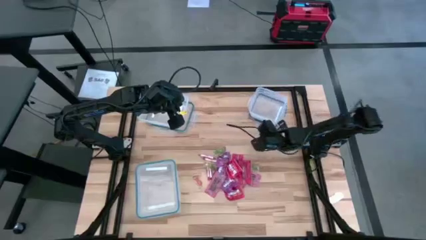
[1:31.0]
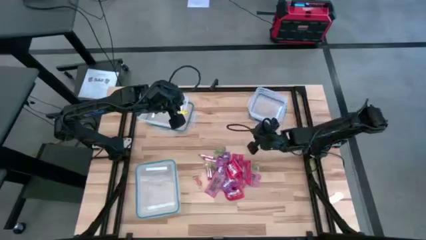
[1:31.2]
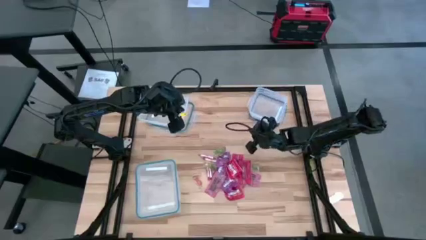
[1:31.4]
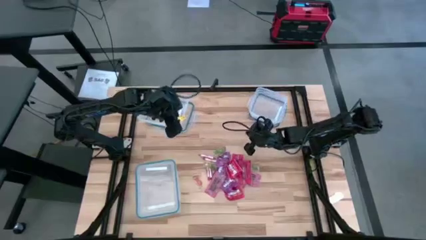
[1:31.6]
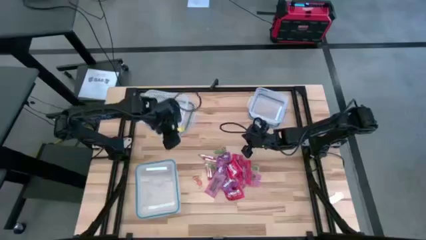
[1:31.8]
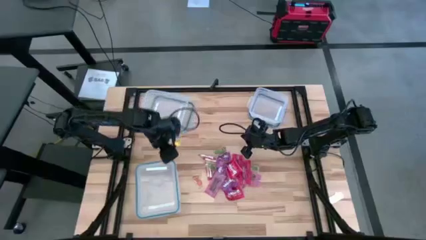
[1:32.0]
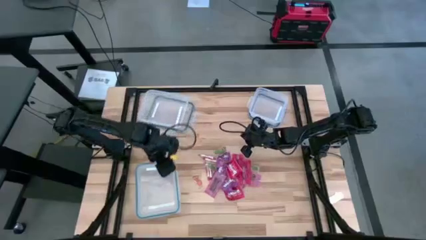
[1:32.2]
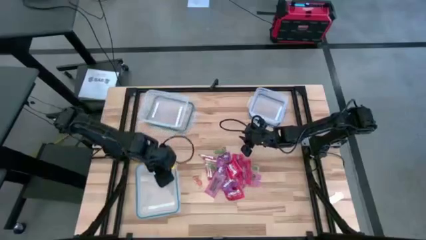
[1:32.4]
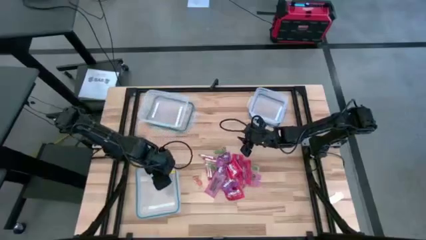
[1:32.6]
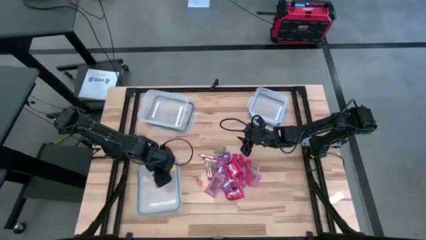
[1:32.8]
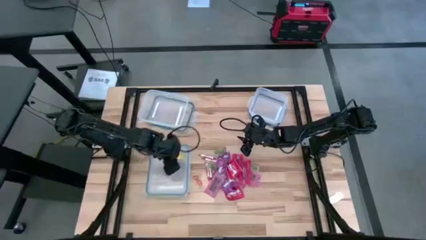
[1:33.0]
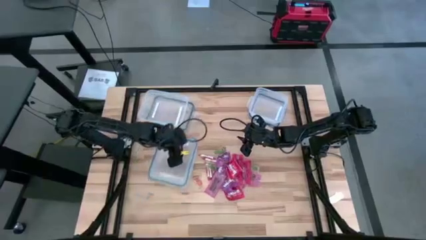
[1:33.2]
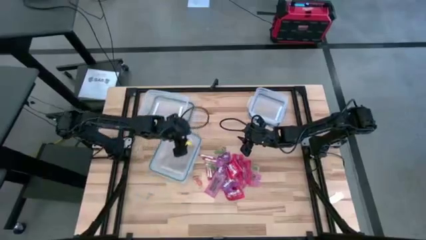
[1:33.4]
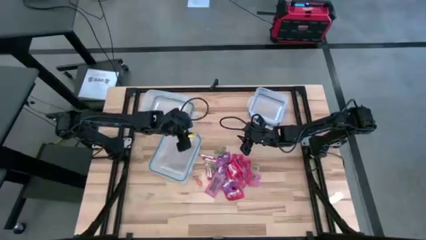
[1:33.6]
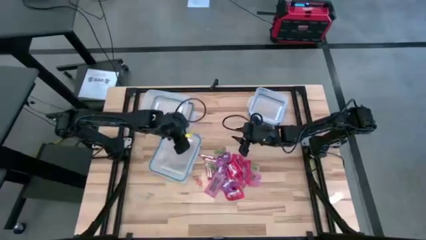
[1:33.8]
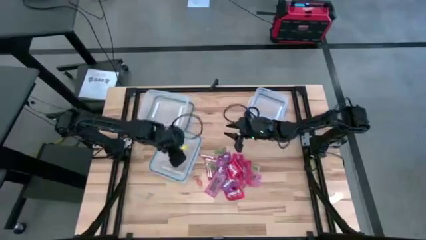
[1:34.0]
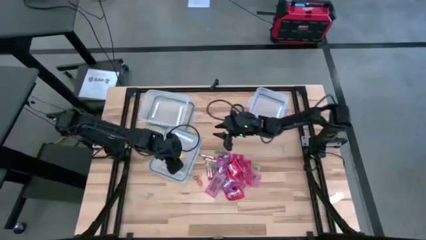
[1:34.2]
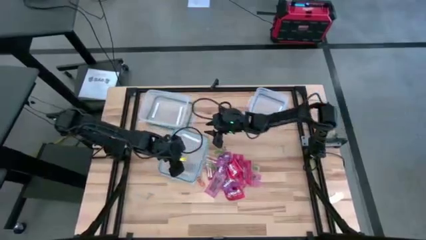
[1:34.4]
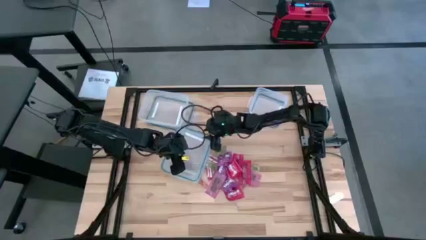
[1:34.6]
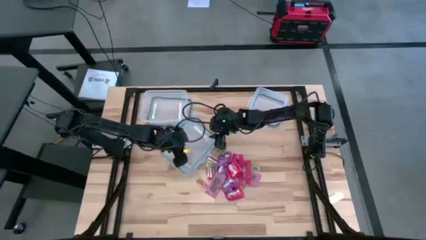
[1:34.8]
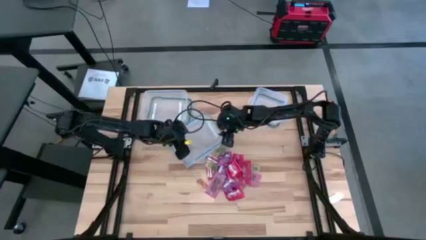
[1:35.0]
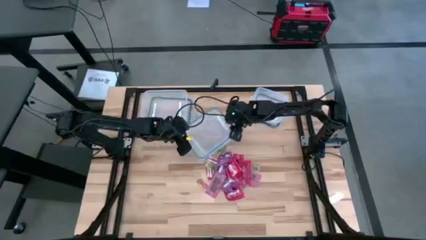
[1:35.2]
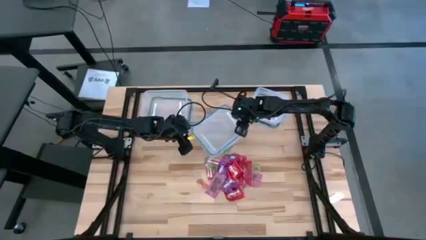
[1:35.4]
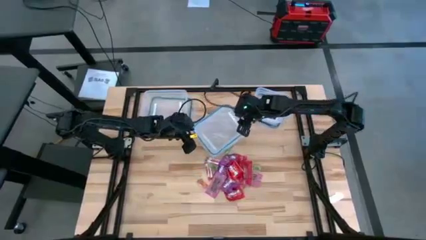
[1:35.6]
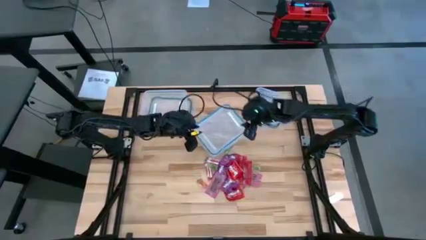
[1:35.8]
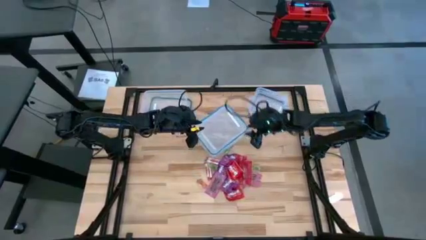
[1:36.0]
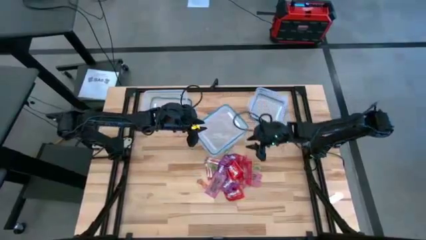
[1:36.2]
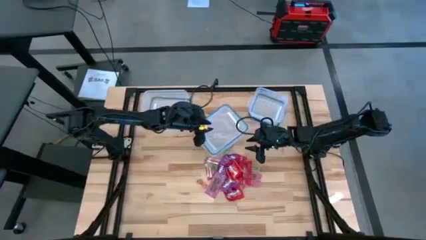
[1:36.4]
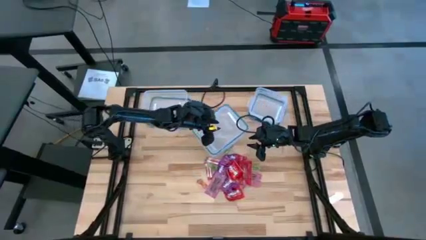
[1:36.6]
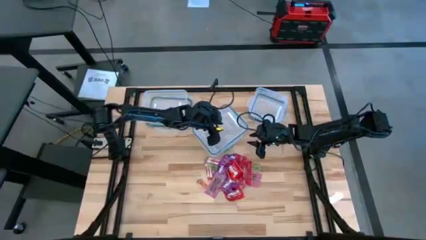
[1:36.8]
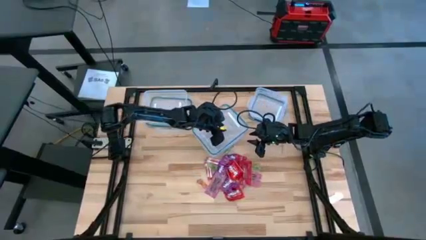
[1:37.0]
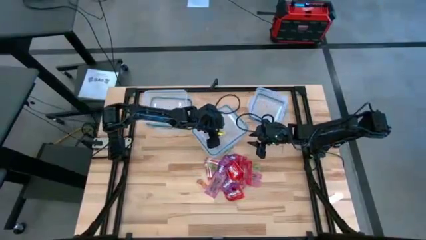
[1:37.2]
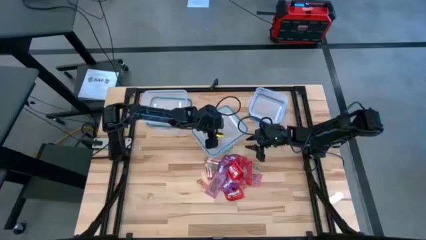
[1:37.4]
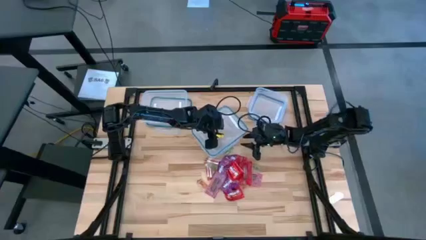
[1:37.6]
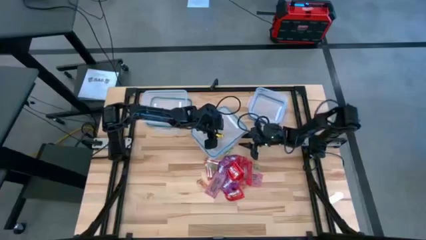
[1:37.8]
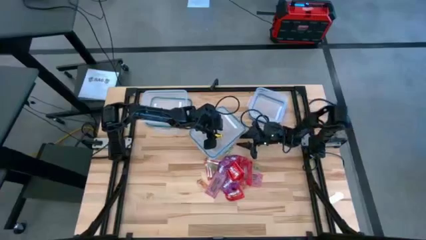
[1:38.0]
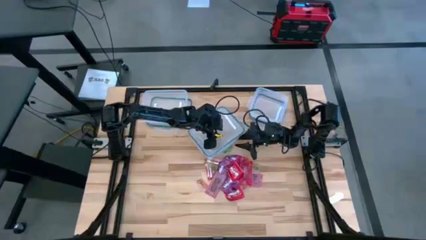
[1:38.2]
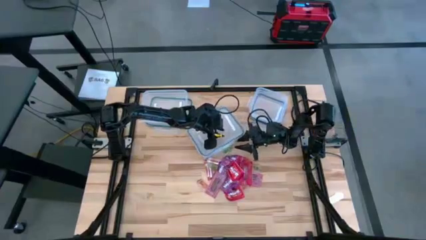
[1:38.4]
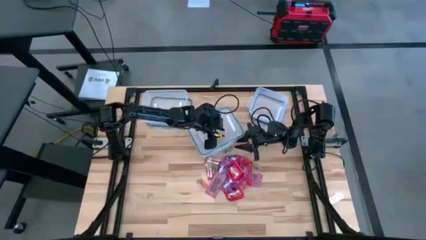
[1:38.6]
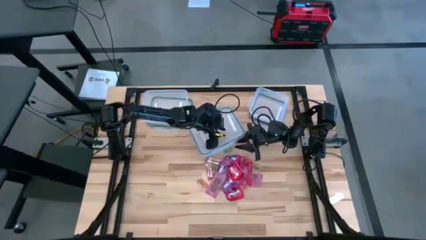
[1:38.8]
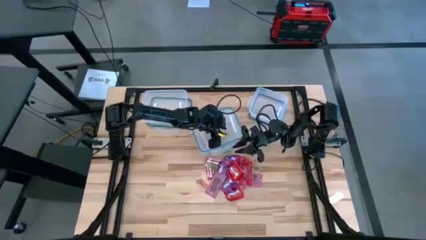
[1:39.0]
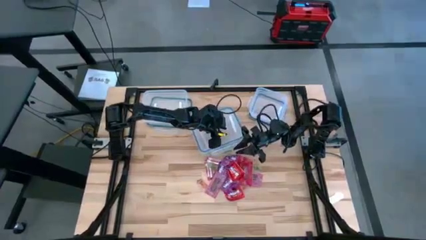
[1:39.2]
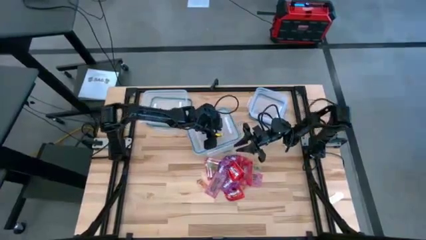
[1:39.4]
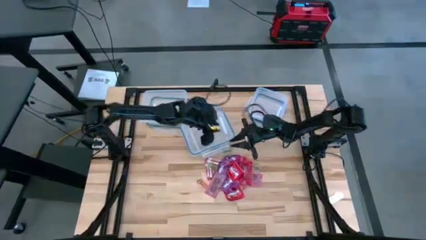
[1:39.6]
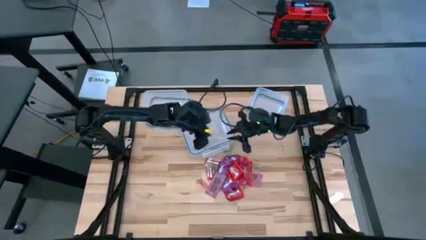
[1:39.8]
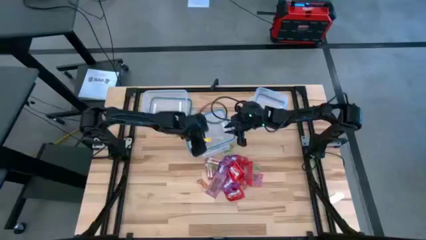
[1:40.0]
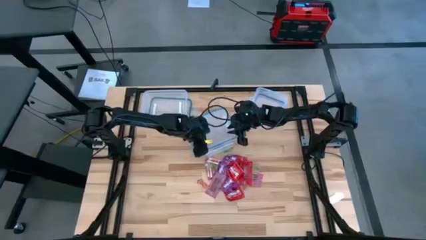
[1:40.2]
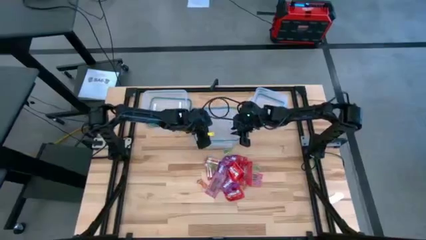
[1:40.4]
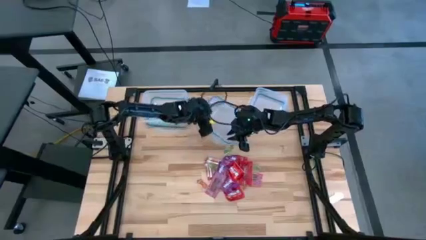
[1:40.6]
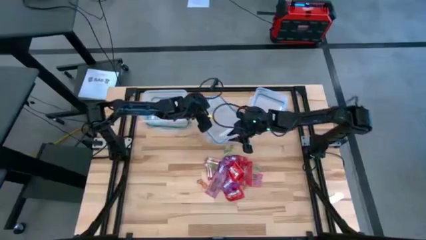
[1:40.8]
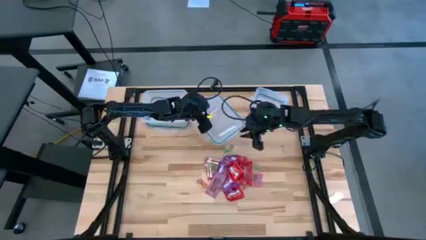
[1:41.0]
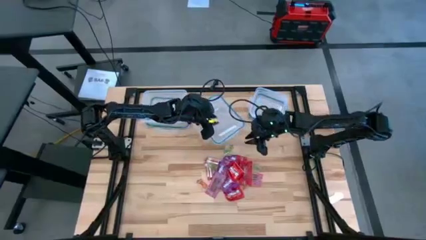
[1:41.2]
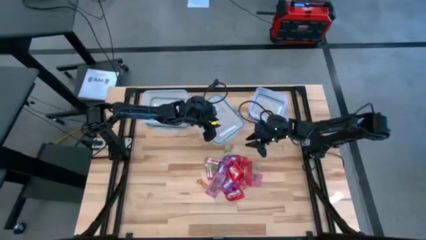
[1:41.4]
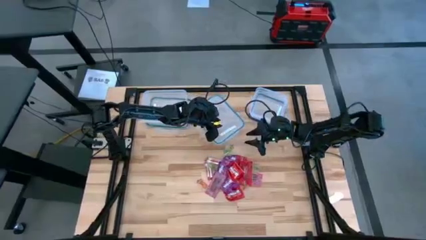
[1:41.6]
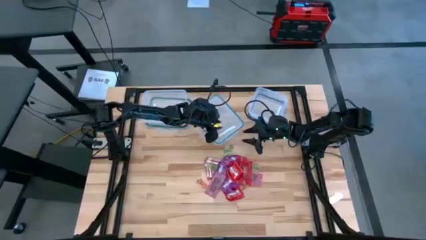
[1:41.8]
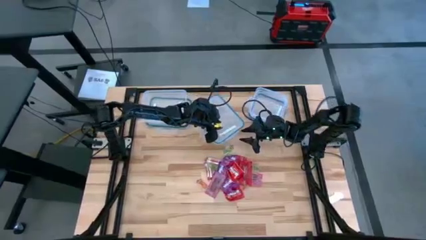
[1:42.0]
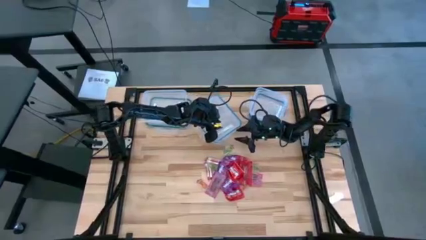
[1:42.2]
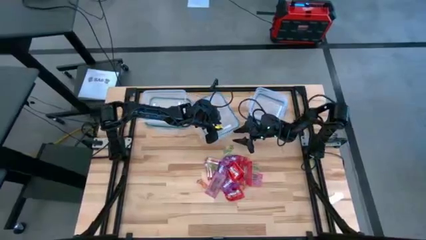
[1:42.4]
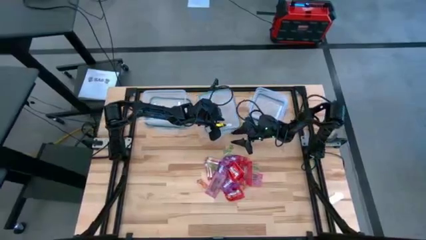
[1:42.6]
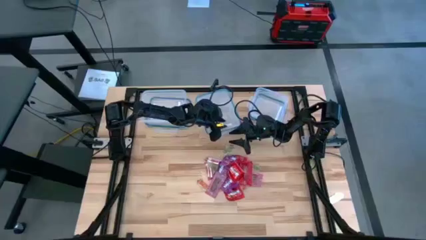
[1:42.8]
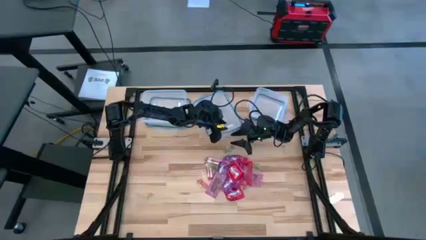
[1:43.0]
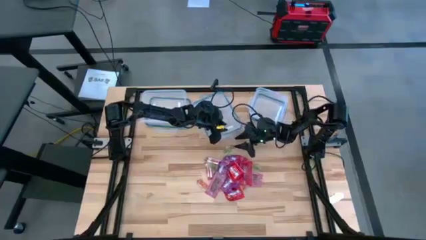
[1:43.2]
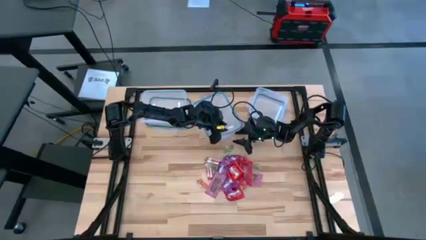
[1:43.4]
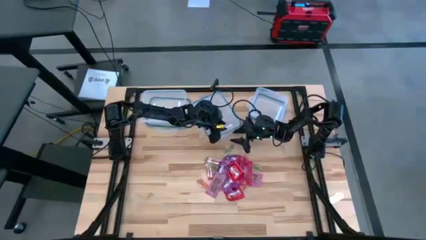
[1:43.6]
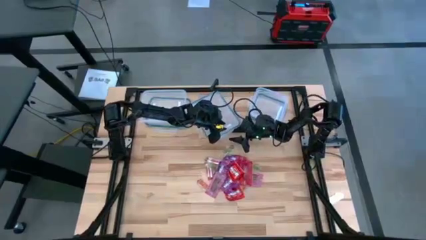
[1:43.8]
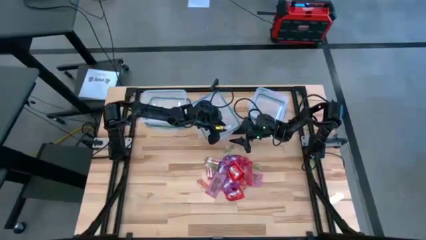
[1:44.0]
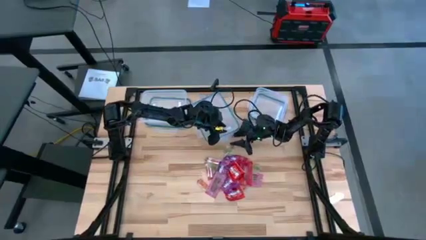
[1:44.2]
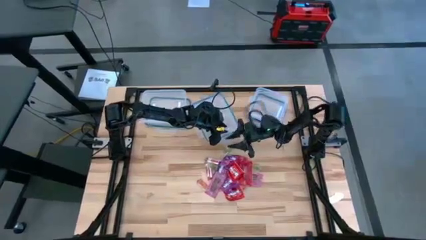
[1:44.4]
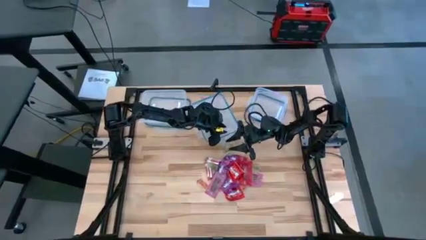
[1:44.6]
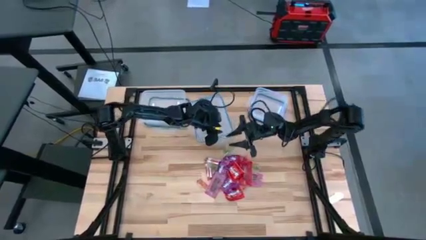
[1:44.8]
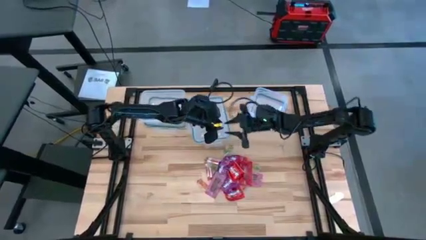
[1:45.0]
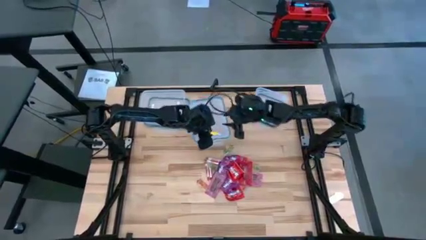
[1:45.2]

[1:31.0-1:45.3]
Task: Sort candy
Open the bottom left transparent bin
